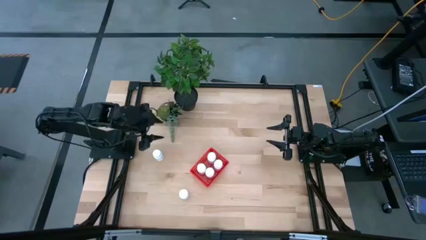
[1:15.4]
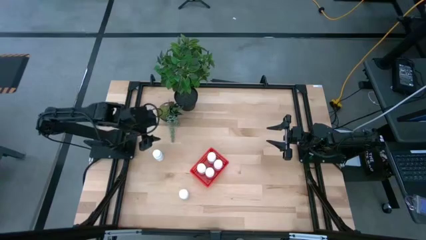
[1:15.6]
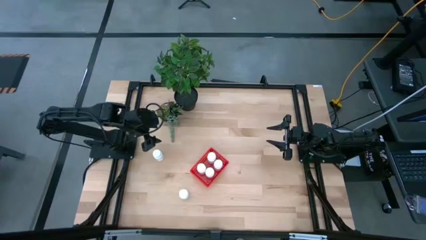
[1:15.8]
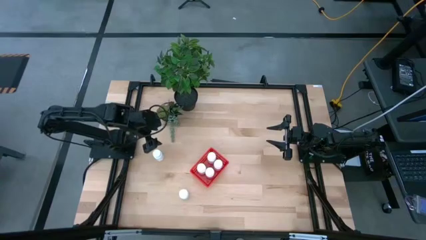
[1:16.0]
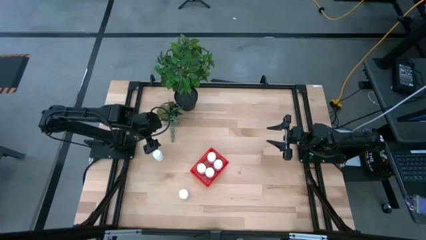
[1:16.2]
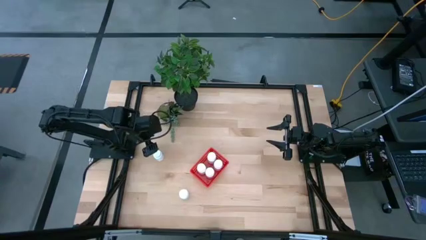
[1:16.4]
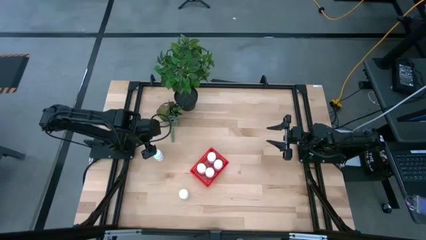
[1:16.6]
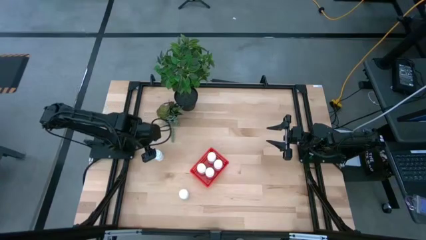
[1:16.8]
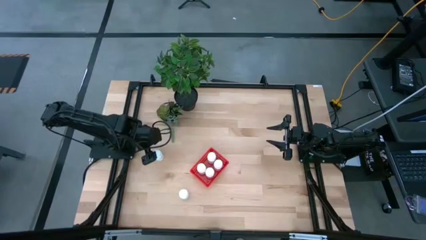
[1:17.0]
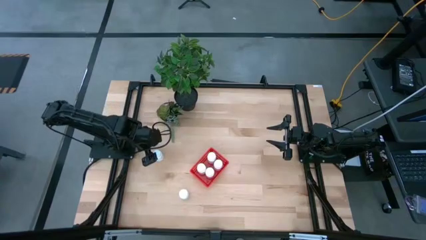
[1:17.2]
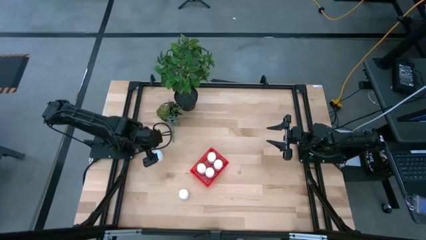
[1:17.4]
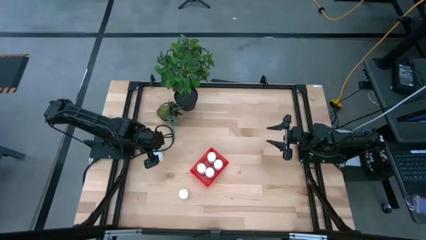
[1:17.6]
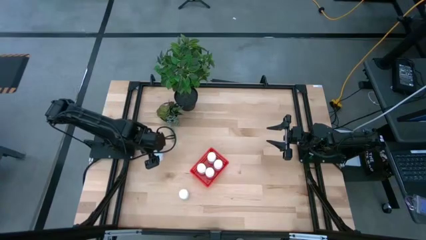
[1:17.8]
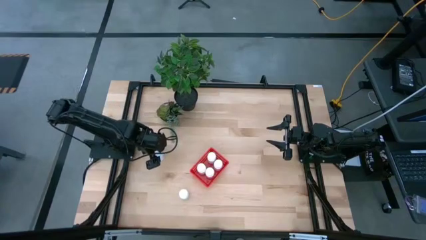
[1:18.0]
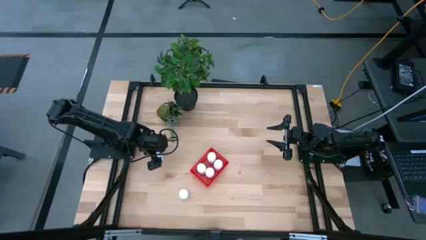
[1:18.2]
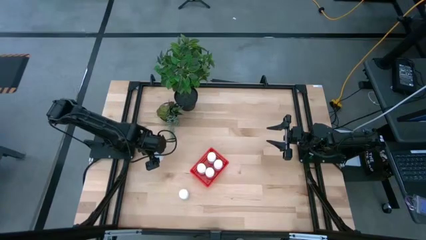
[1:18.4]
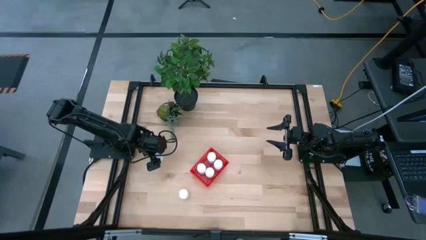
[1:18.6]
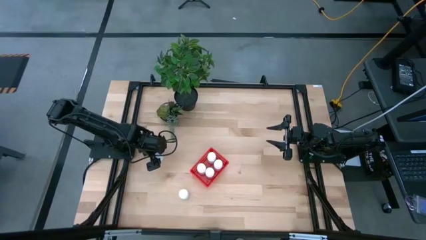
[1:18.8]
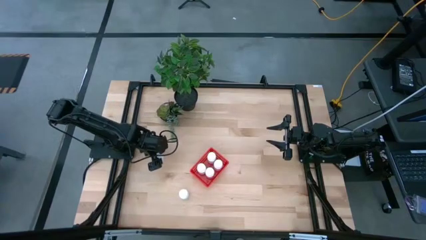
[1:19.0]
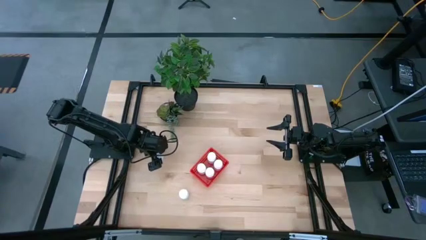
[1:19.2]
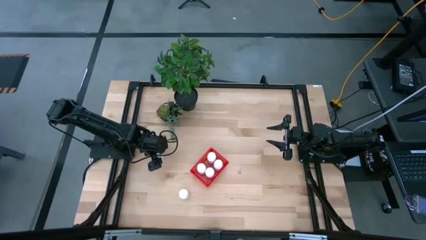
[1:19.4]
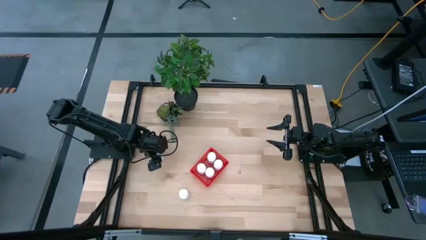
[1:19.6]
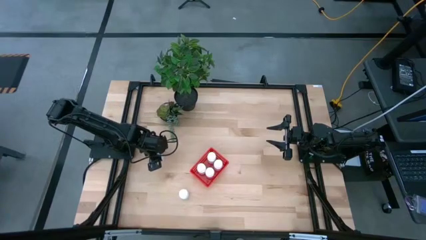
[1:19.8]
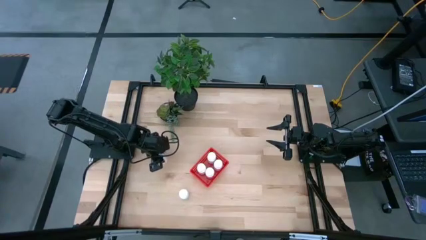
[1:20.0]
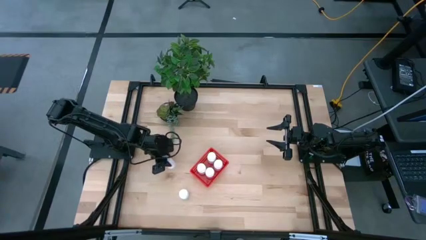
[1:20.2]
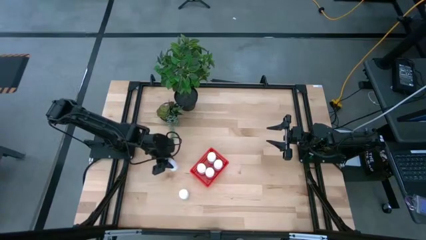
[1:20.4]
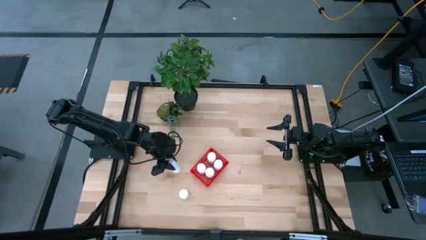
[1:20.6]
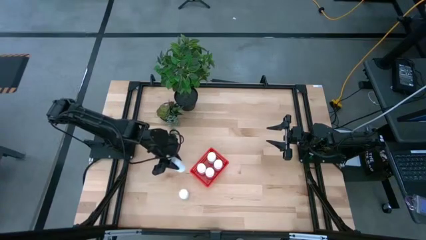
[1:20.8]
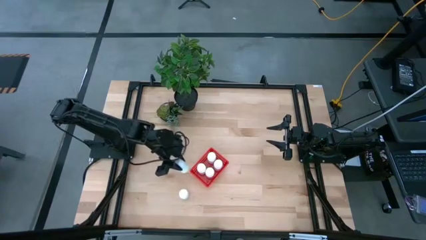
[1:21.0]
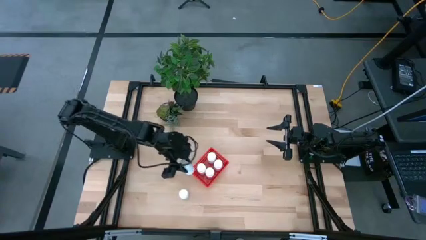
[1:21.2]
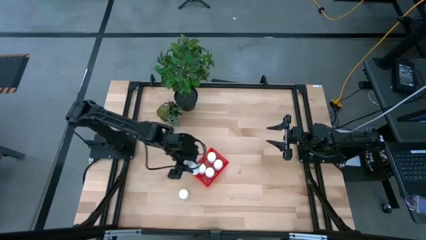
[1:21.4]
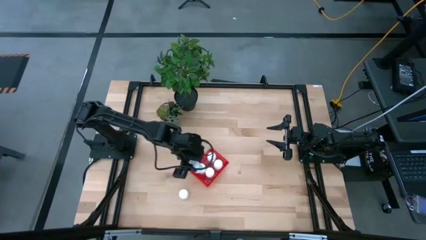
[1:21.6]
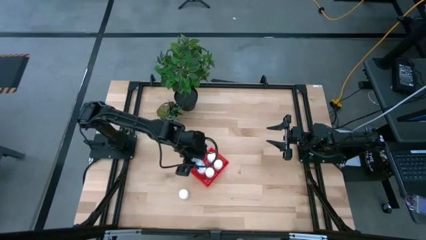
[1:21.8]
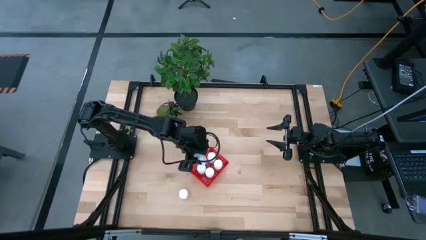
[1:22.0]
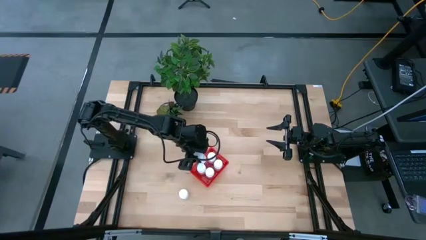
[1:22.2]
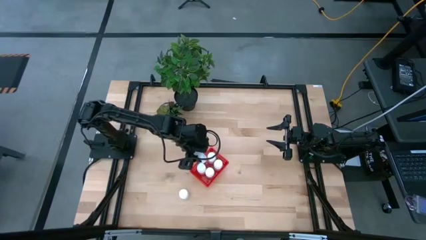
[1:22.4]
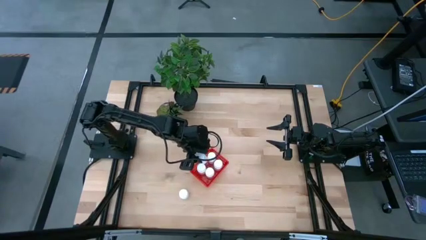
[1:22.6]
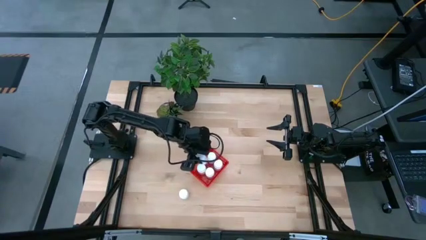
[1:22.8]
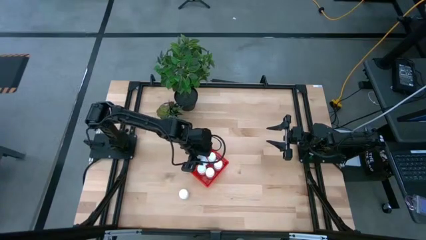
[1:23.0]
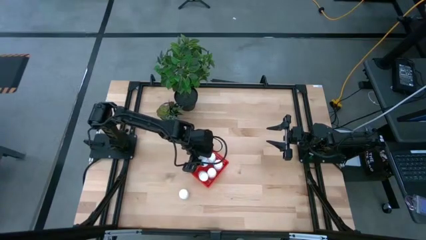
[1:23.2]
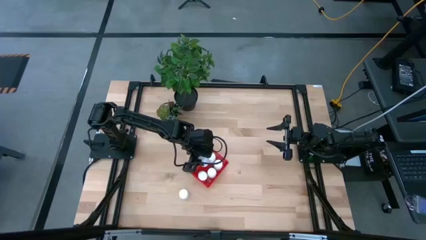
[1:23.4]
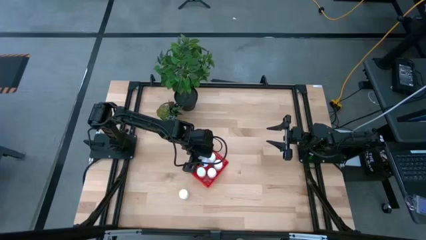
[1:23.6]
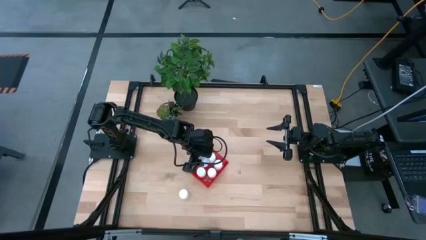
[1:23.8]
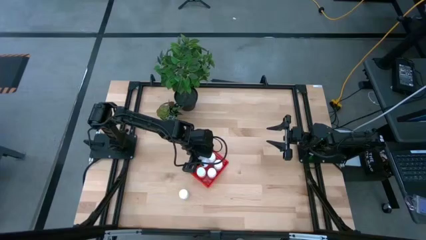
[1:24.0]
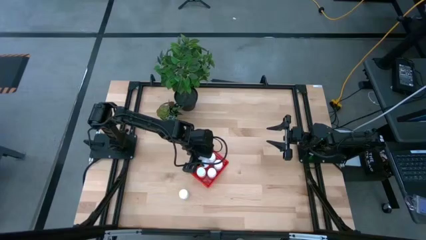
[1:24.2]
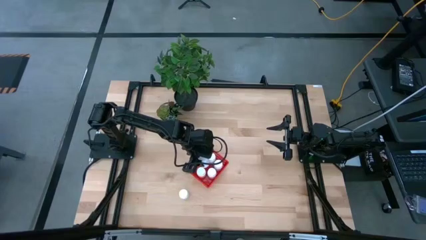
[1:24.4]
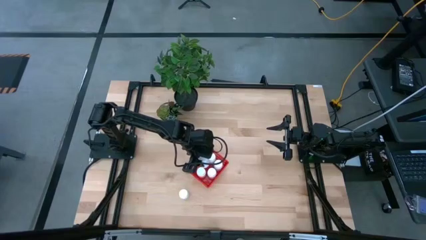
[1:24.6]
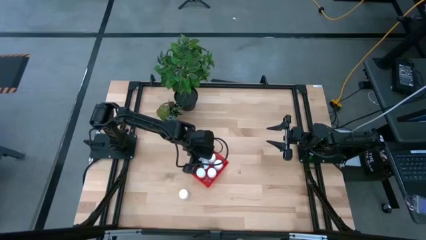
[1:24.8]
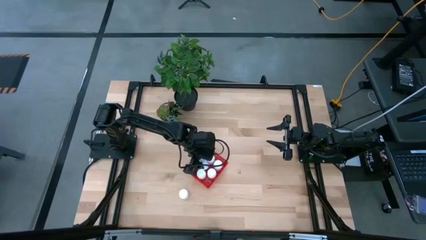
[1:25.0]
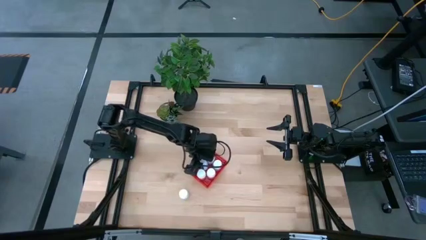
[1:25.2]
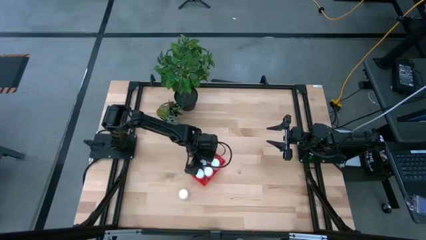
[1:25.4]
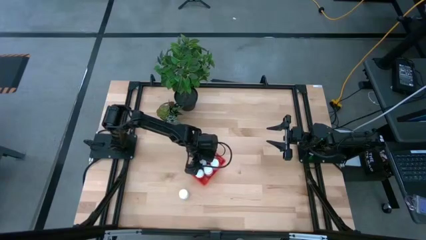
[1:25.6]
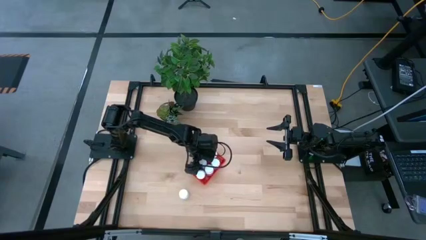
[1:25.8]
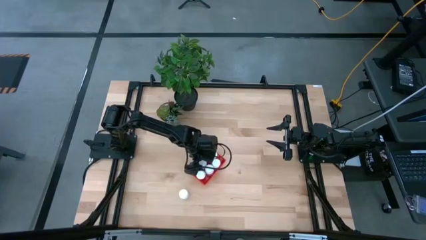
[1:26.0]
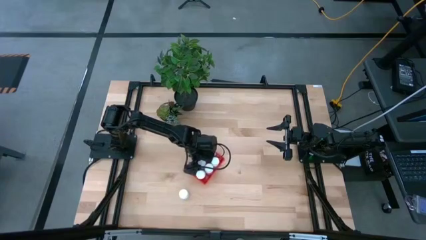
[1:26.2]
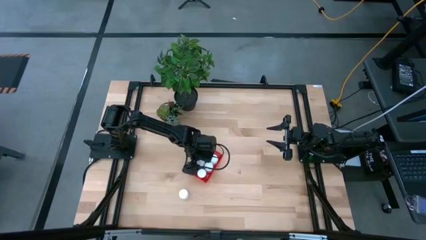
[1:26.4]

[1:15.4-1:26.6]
Task: Pick and place pill bottles into a basket
Put the top white medicine bottle into the red bin

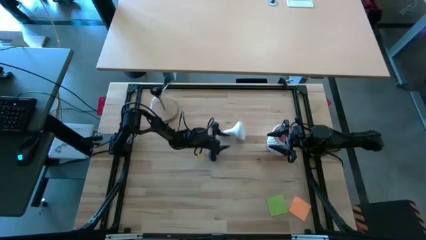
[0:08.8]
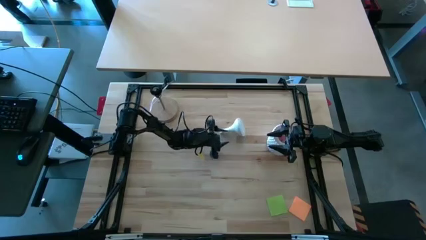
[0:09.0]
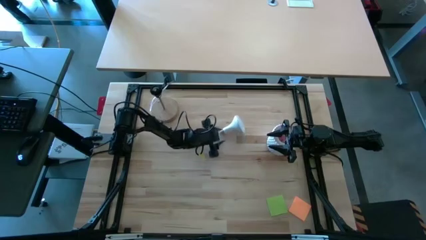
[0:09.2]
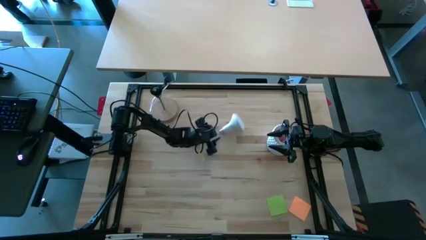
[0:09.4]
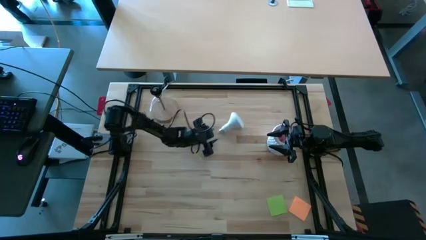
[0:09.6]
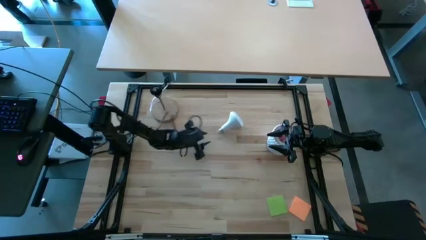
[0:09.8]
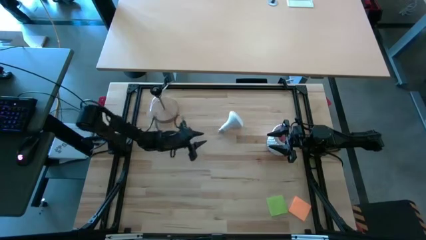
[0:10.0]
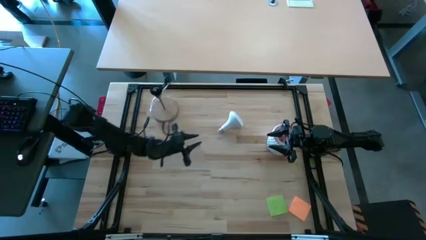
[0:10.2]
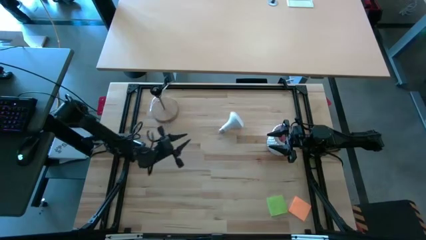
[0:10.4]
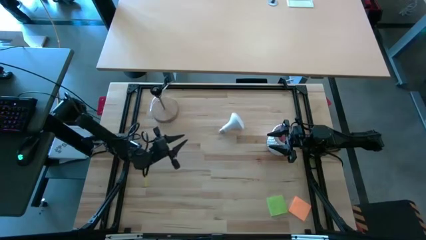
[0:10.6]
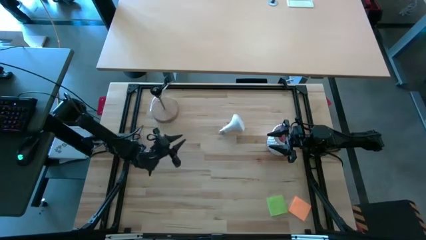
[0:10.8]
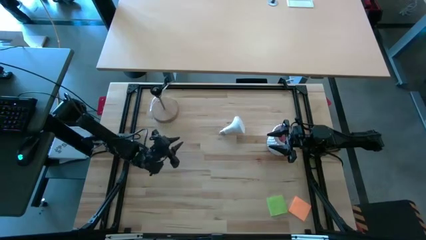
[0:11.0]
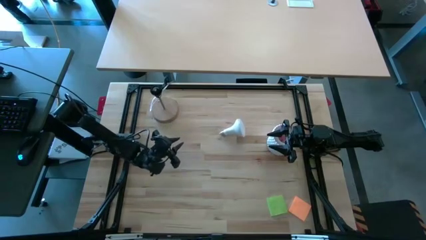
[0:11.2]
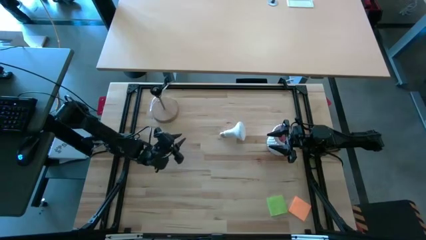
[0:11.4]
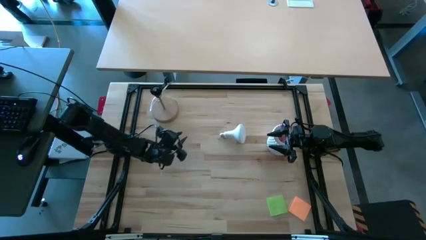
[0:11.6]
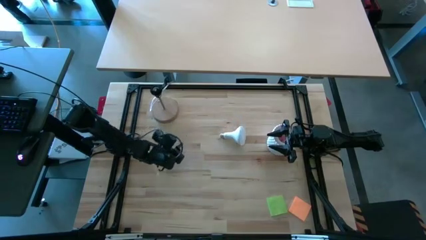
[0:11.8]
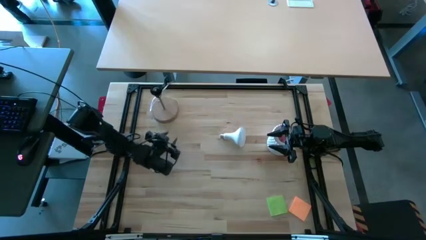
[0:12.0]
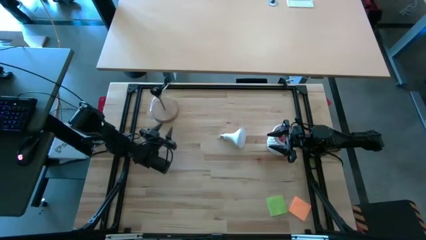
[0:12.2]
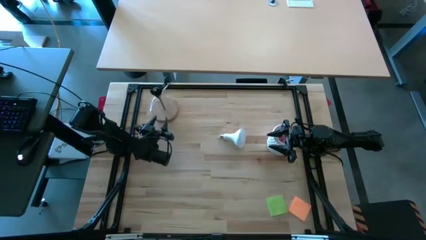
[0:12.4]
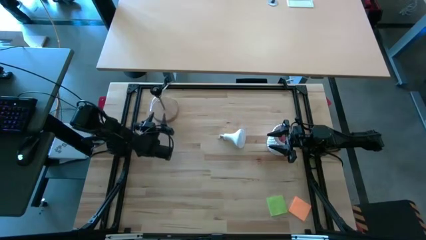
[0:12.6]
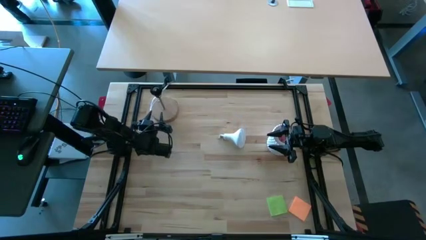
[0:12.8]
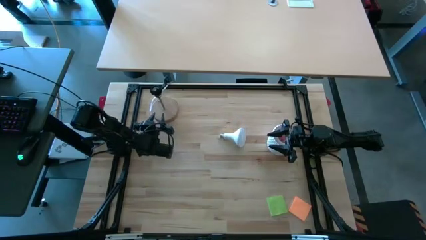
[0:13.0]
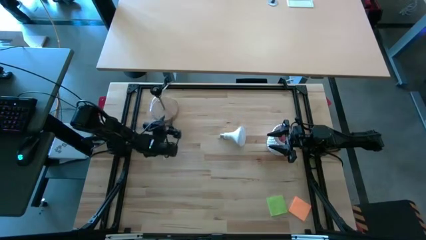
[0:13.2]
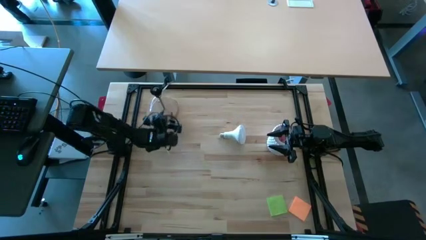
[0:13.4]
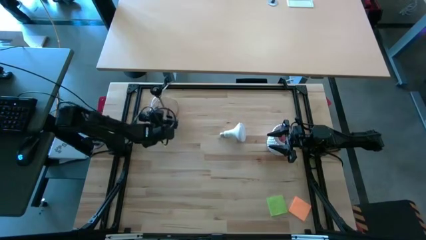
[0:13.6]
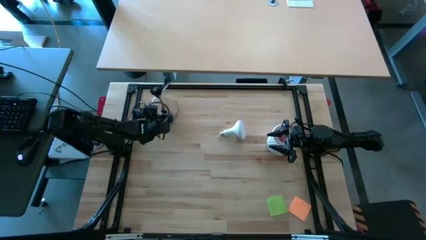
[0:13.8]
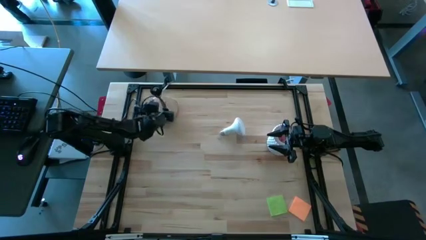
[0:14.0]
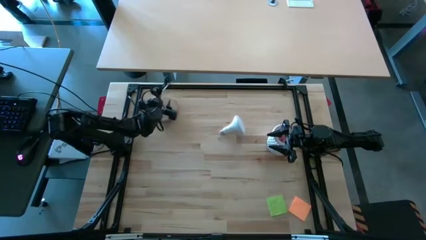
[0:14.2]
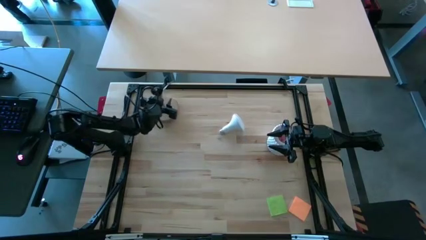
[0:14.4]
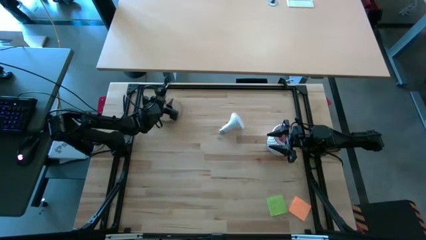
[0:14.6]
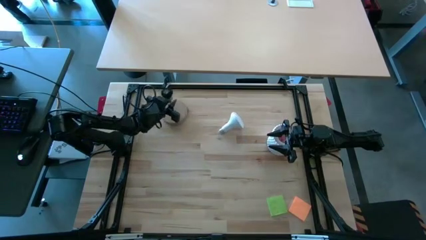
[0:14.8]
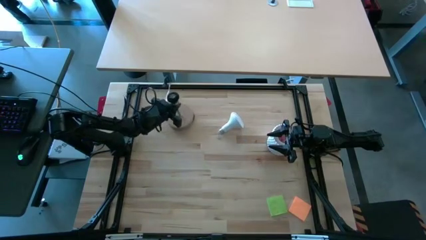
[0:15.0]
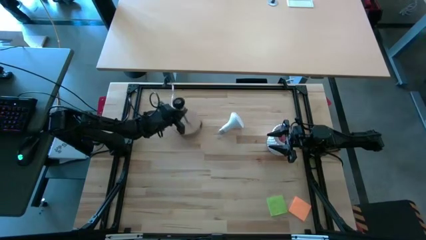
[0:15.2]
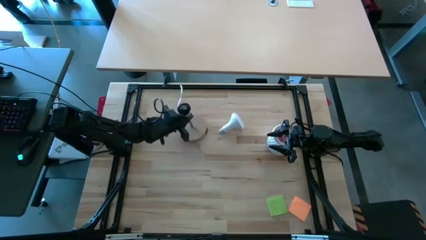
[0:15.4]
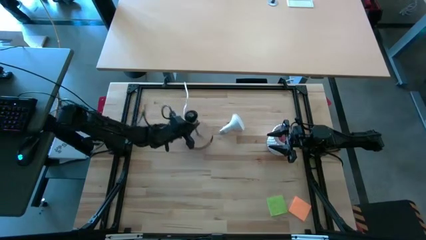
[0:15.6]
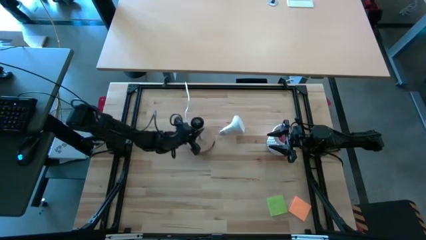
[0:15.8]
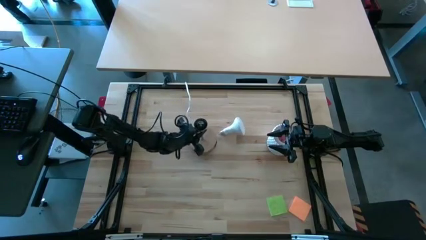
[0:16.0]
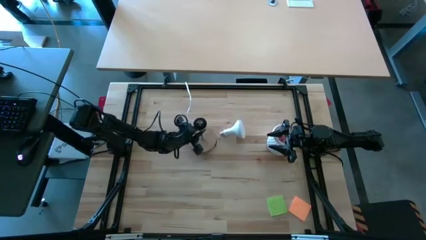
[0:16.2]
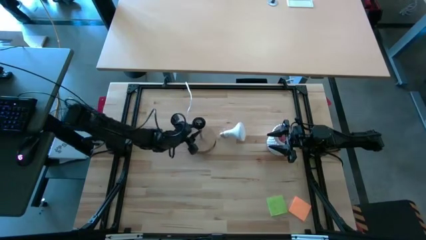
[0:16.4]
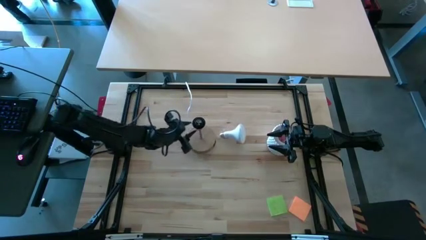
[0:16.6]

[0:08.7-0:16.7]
Task: Screw lightbulb
Move the lamp to the center of the table
